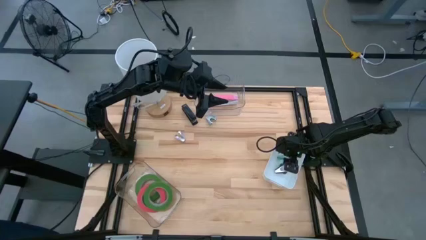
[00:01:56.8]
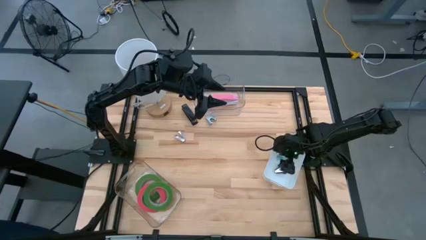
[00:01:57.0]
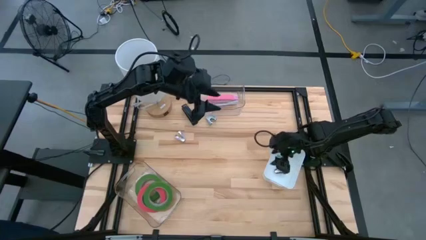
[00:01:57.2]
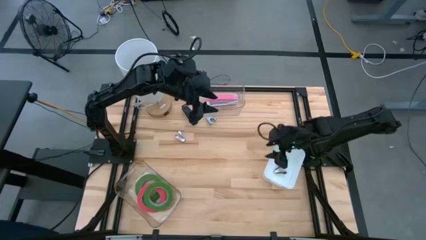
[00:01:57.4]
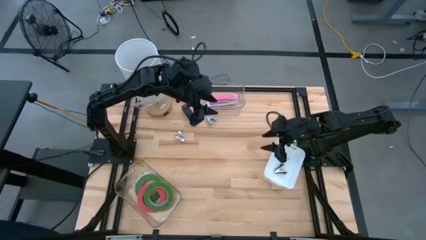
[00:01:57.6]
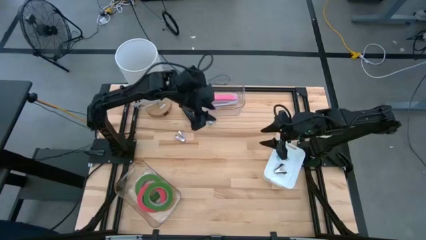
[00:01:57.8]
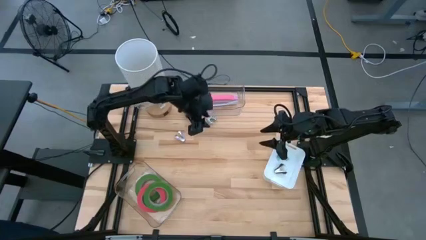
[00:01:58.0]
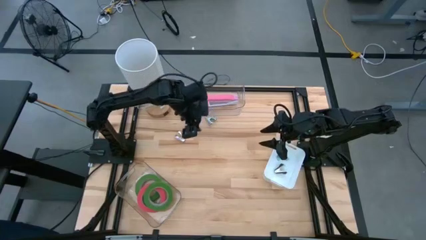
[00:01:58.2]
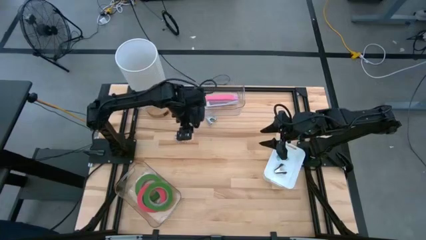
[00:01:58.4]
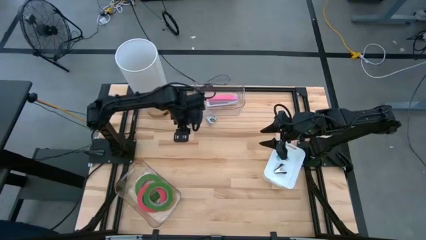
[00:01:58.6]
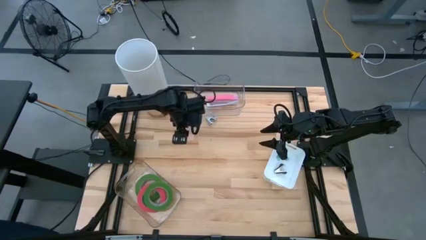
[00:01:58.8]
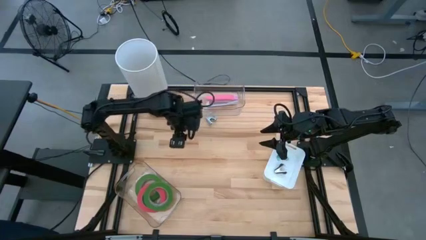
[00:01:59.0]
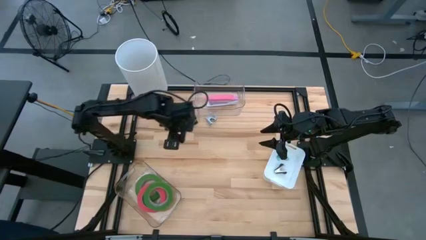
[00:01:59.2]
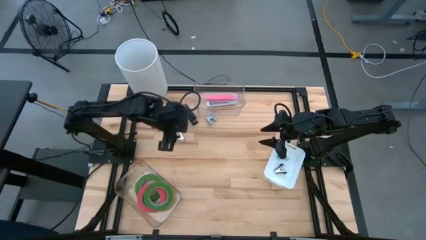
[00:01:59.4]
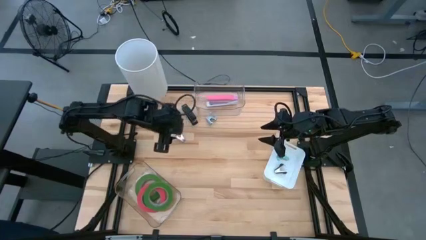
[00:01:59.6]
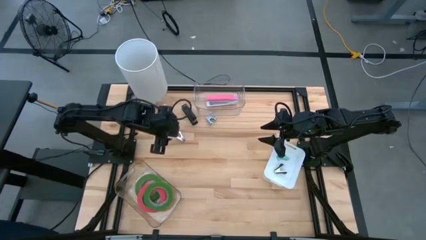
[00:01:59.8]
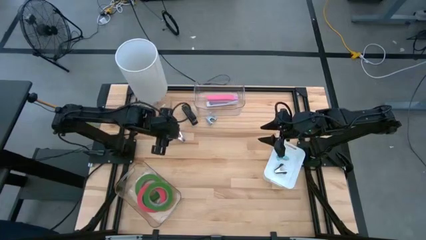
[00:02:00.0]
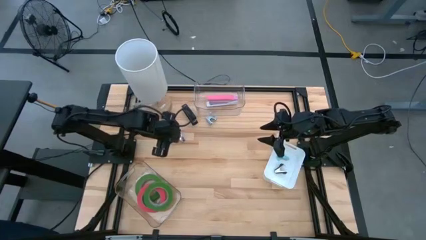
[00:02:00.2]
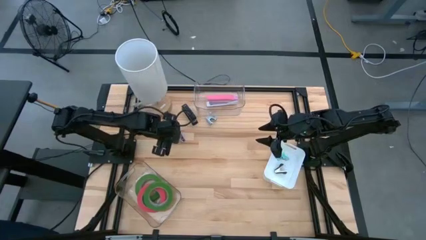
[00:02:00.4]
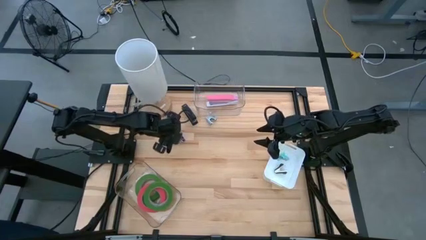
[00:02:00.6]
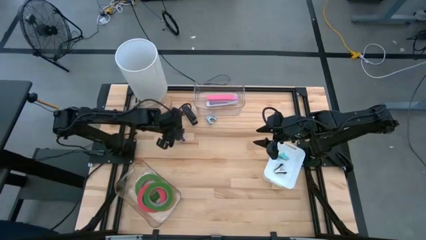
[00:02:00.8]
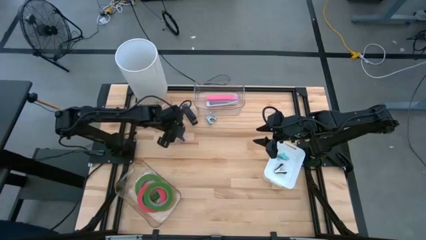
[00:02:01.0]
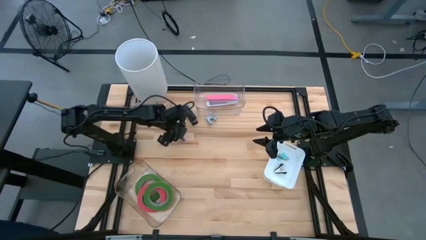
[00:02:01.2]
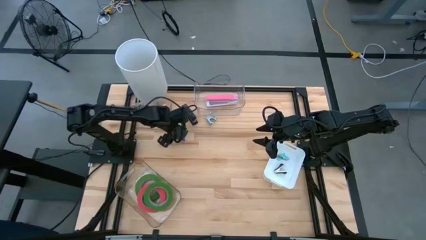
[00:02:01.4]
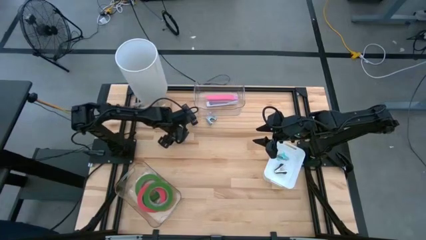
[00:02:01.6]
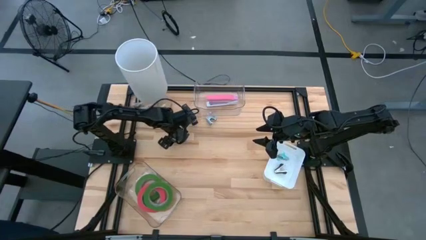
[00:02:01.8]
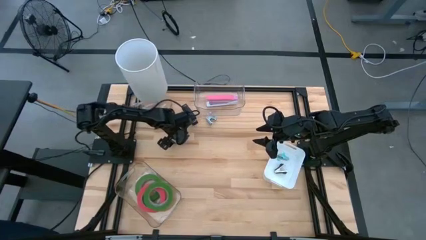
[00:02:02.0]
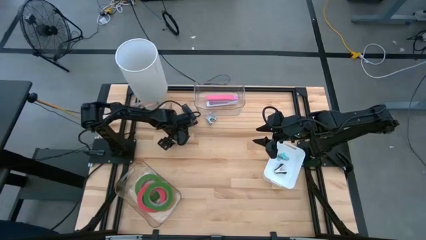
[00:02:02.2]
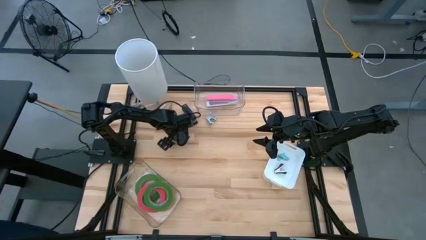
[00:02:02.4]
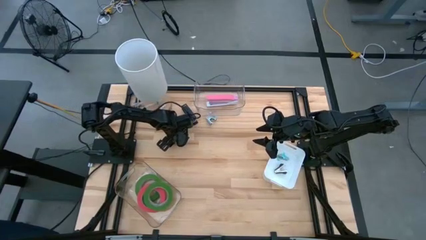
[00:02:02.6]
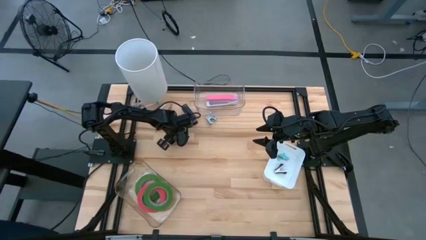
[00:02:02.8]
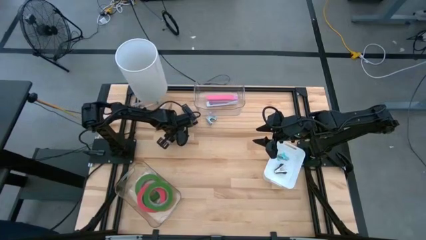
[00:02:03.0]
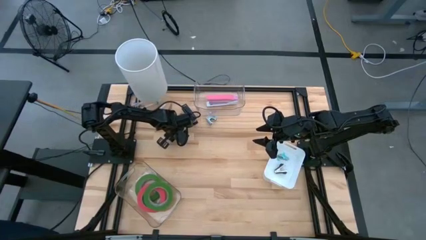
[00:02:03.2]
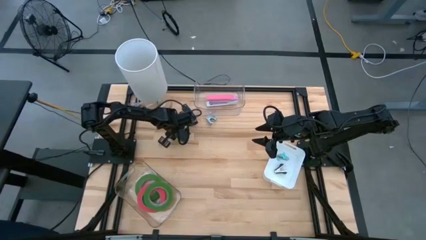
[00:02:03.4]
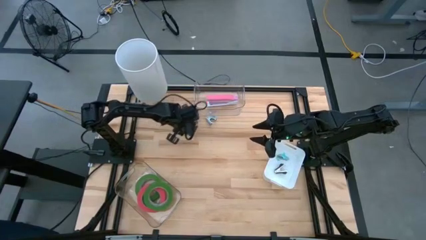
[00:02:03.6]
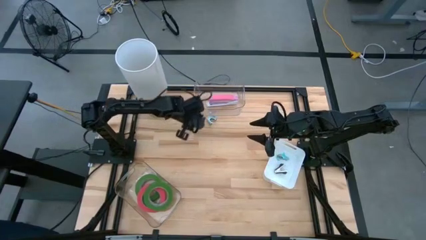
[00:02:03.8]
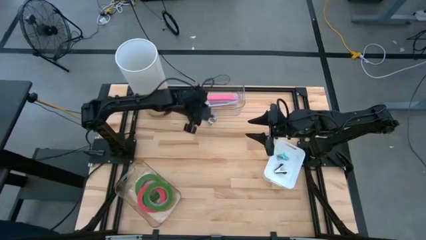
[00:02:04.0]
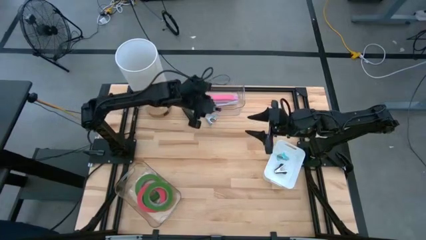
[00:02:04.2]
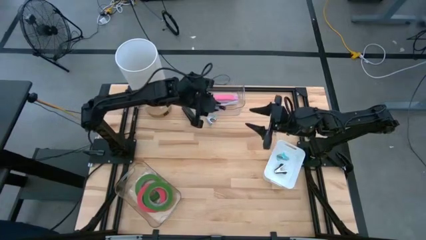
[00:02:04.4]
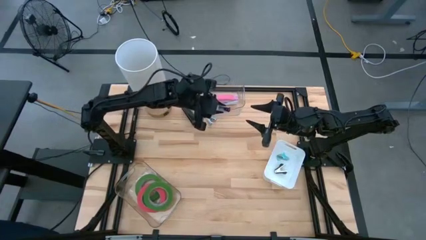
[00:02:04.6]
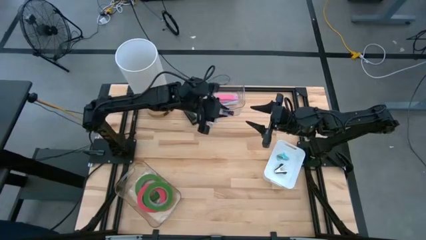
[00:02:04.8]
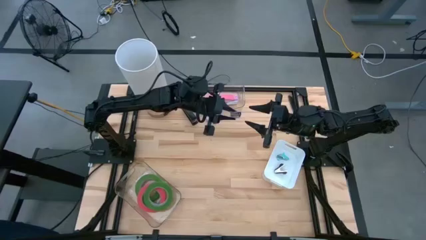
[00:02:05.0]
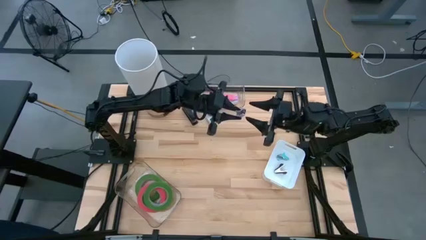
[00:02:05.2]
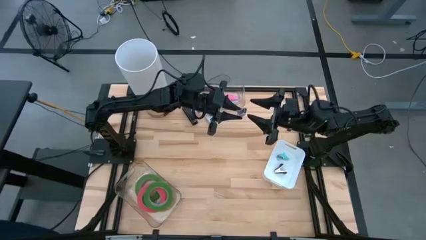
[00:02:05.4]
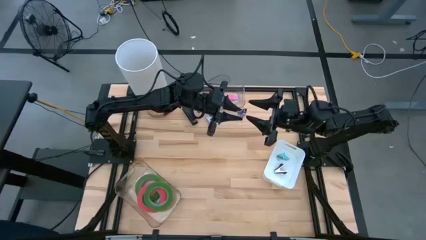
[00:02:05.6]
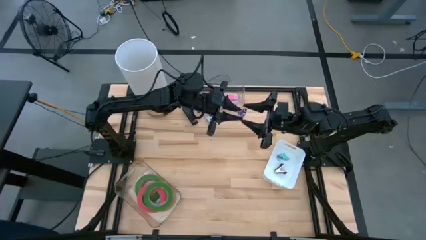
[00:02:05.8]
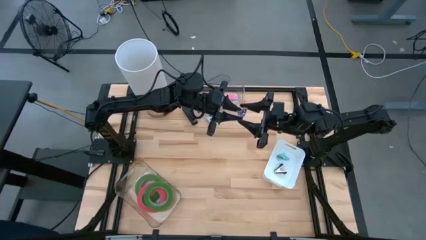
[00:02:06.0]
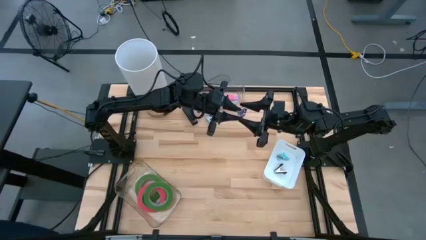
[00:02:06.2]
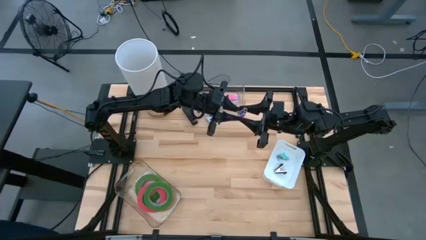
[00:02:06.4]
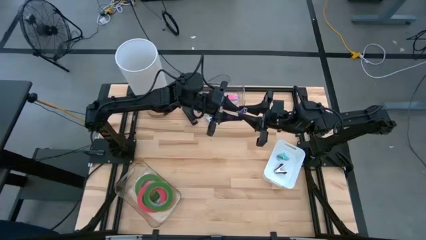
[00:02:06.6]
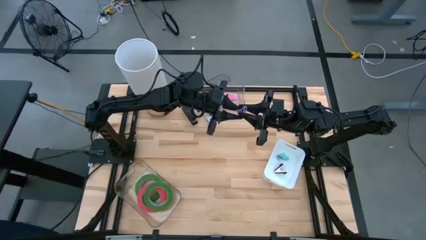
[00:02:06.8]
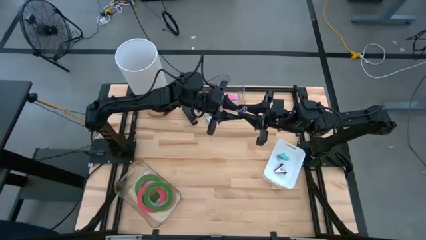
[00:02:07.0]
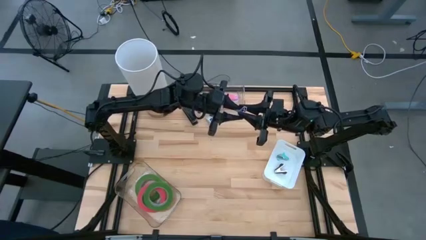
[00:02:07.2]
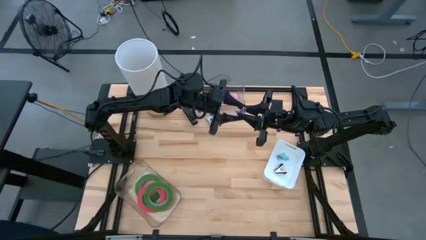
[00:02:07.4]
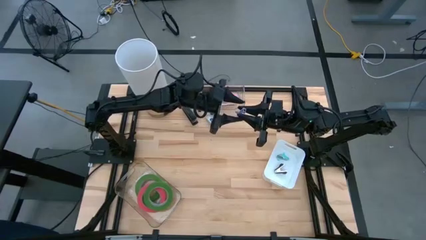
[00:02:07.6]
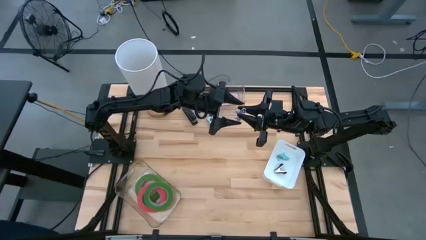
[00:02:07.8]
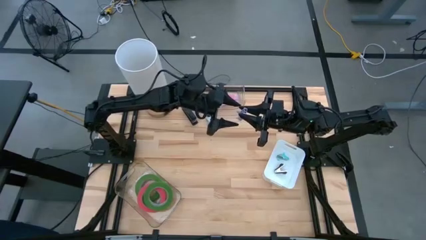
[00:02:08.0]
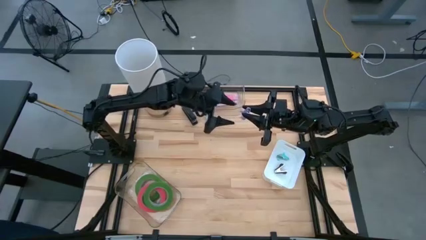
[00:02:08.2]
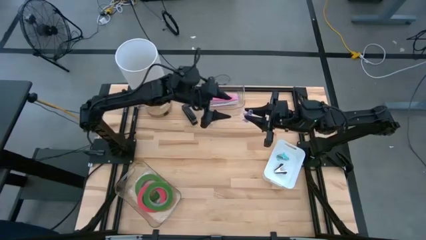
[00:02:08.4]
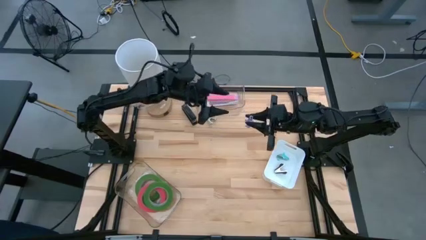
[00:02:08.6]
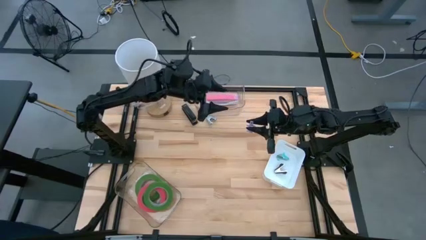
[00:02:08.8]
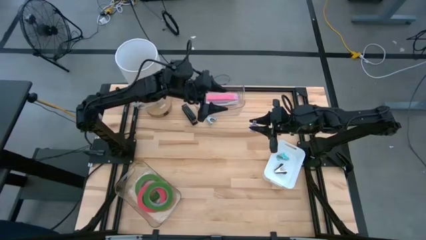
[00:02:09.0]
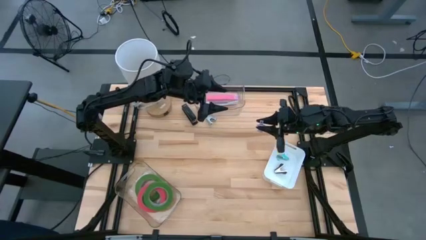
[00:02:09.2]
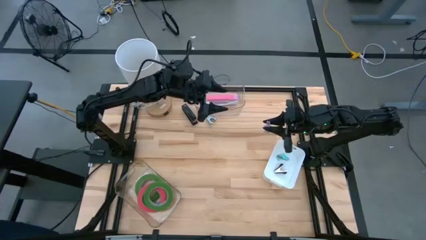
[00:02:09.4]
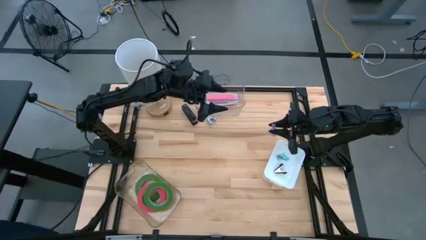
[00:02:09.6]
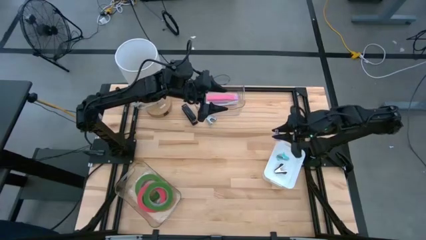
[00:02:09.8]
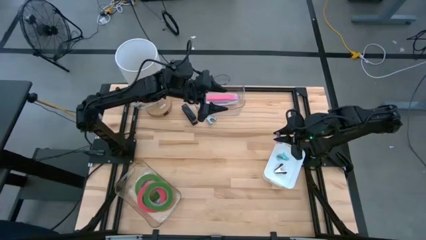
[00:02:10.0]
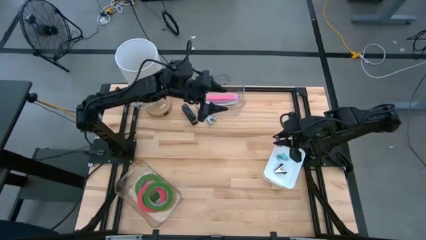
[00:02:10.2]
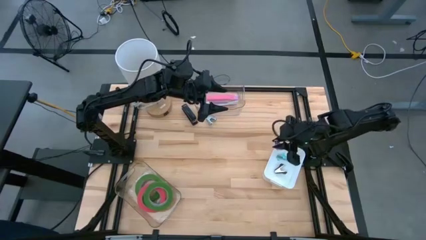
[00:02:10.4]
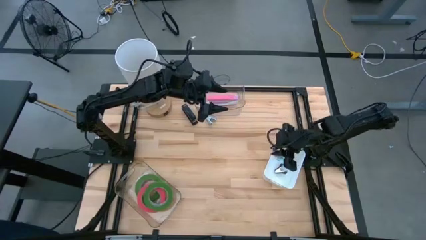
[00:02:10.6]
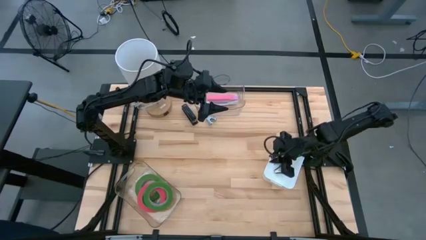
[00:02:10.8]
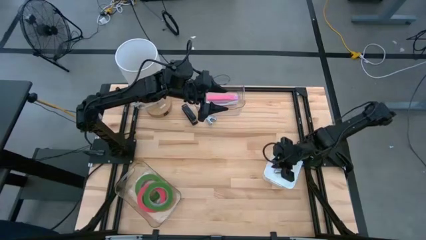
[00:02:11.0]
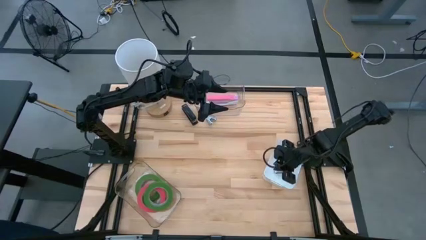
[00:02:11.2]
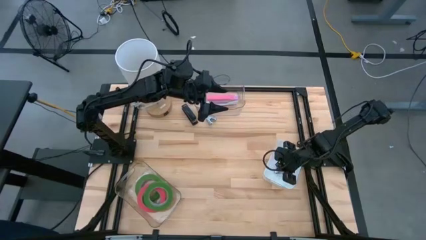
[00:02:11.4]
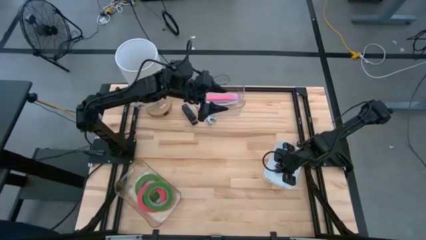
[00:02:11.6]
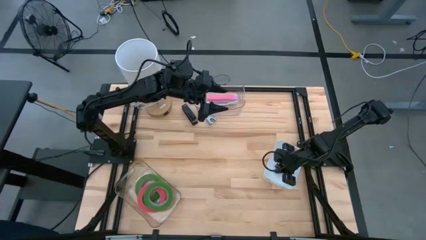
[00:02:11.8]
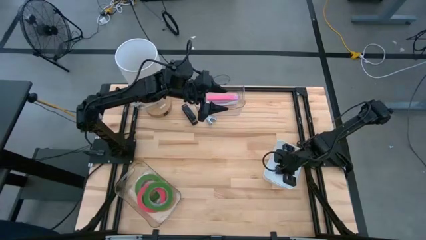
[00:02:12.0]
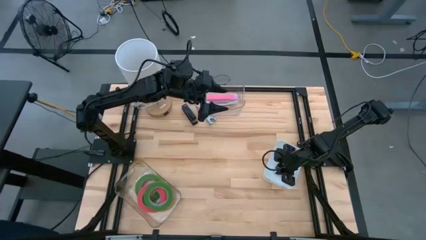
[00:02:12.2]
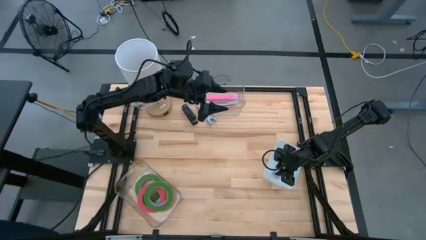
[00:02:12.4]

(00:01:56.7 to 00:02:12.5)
Task: Pick and place Stapler, Stapler remover, tape
Put the purple staple remover into the white bin

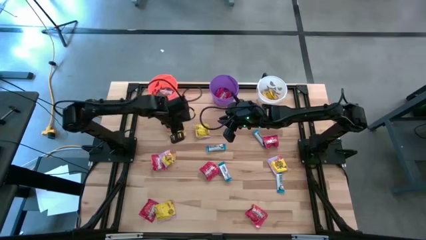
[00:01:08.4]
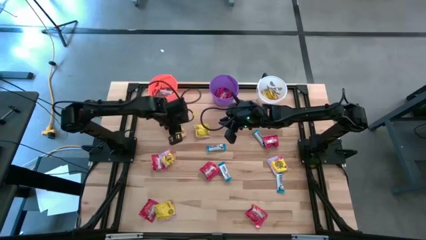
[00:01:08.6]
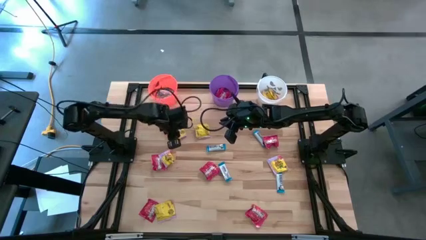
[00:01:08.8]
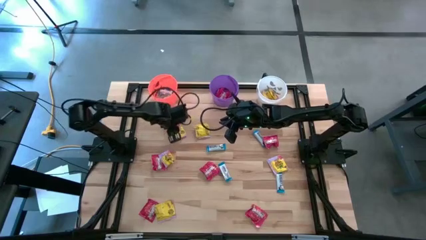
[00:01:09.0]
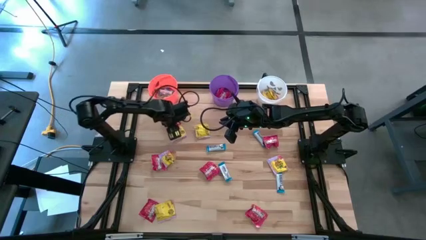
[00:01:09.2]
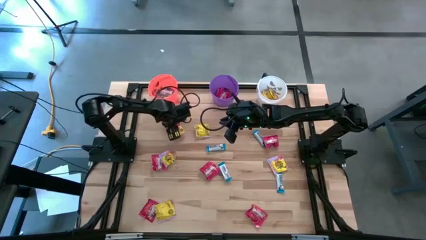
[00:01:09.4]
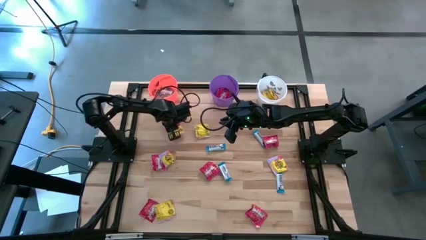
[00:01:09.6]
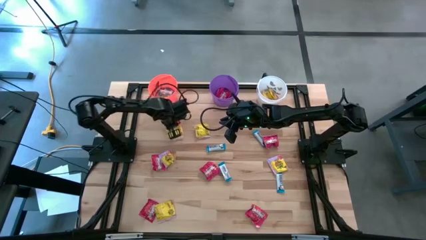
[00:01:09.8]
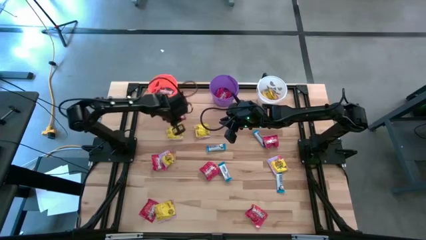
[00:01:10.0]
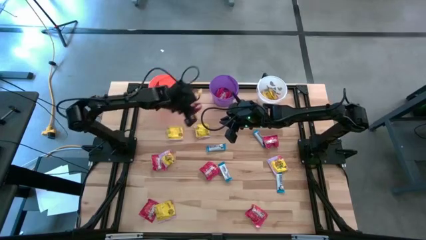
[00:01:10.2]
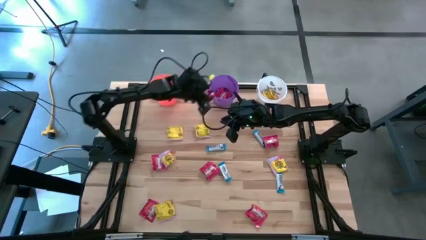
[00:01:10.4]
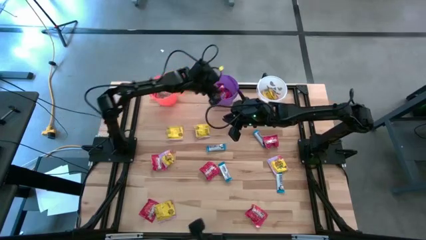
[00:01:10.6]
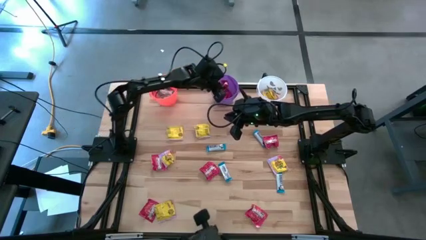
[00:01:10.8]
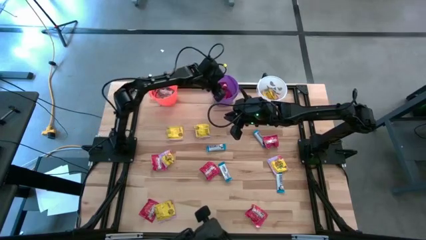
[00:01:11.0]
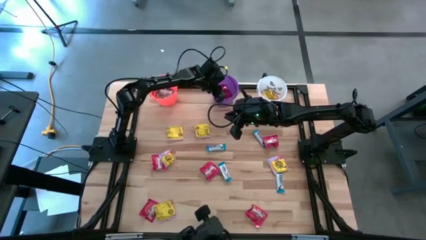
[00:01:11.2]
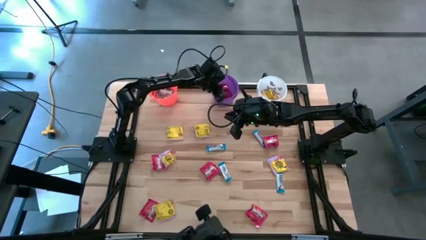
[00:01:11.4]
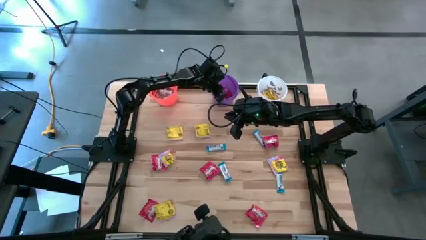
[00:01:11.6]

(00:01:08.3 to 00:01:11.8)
Task: Sort candy
Put the red candy into the purple bucket
